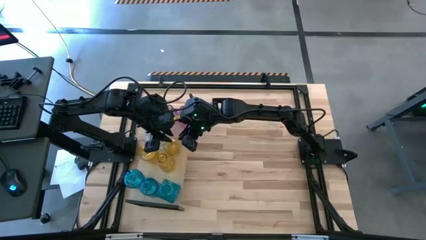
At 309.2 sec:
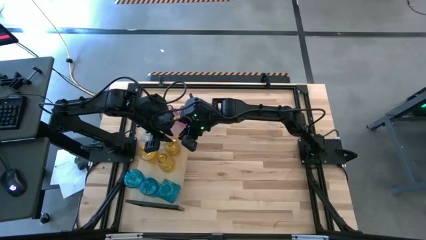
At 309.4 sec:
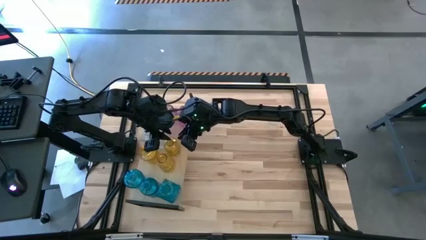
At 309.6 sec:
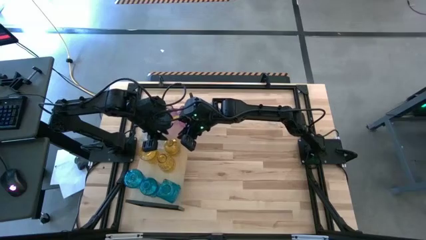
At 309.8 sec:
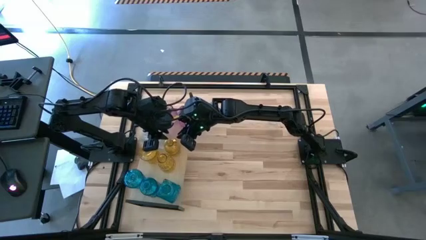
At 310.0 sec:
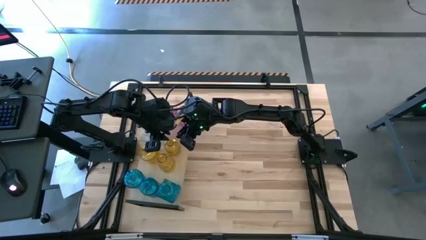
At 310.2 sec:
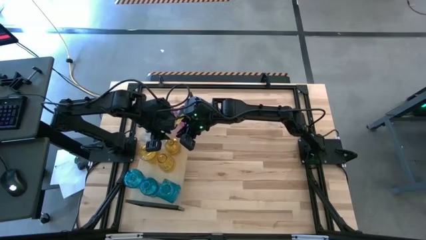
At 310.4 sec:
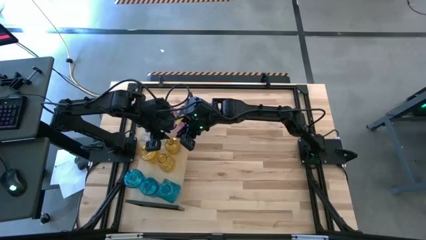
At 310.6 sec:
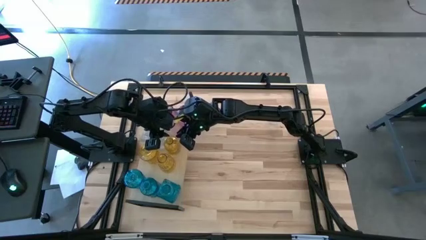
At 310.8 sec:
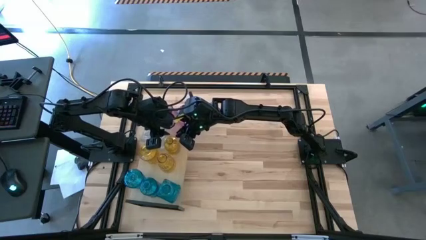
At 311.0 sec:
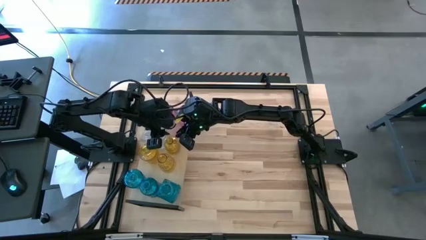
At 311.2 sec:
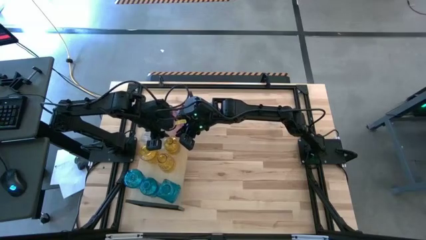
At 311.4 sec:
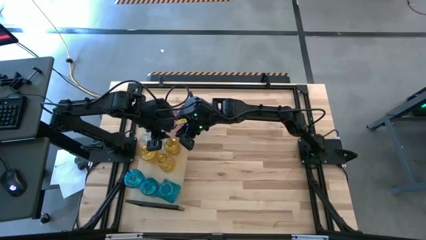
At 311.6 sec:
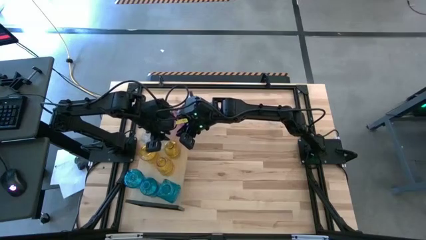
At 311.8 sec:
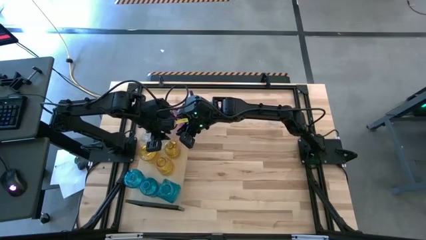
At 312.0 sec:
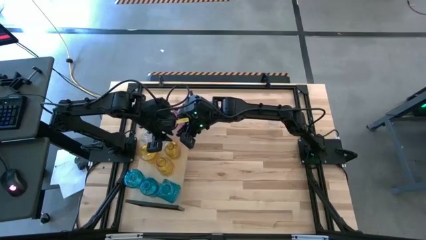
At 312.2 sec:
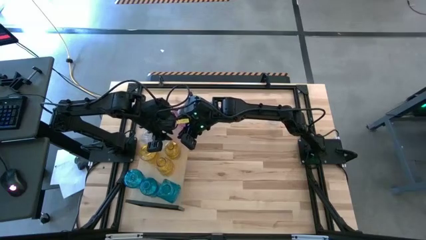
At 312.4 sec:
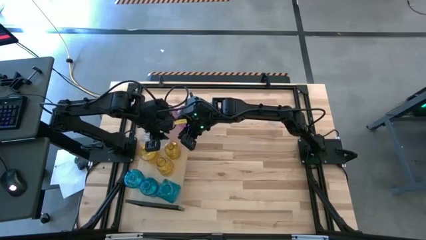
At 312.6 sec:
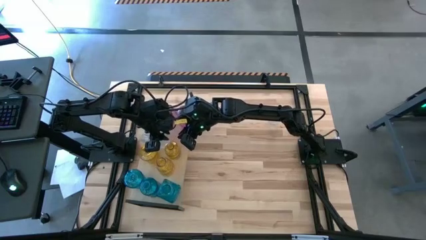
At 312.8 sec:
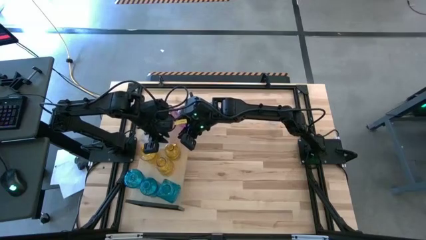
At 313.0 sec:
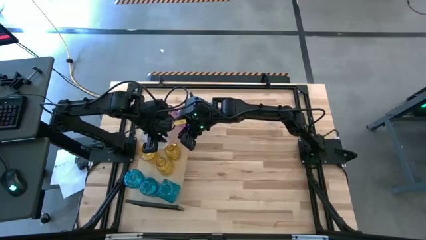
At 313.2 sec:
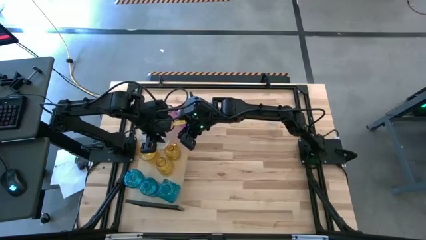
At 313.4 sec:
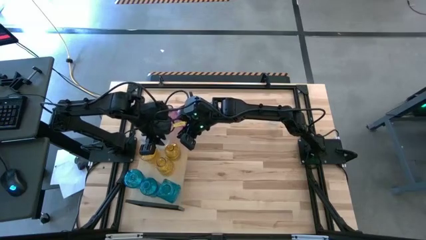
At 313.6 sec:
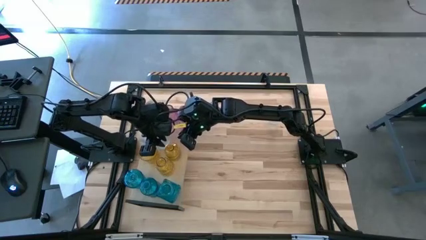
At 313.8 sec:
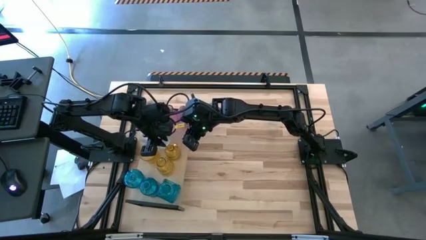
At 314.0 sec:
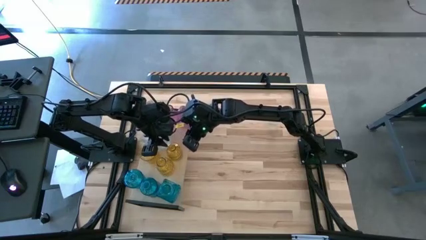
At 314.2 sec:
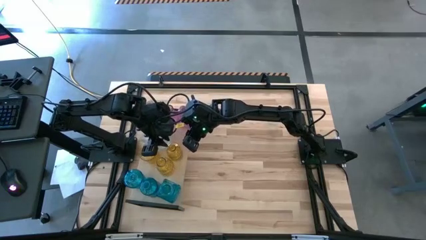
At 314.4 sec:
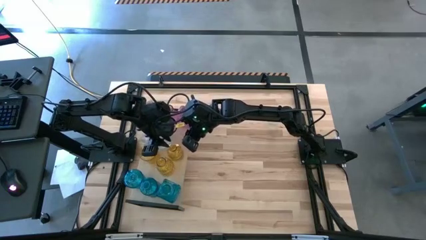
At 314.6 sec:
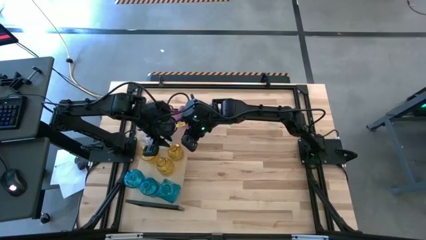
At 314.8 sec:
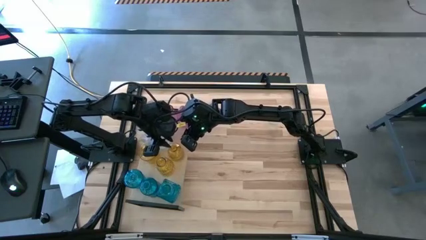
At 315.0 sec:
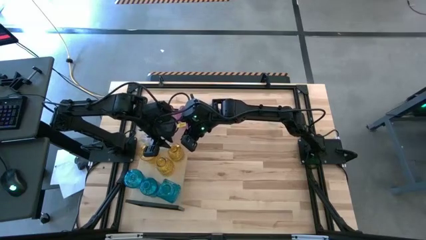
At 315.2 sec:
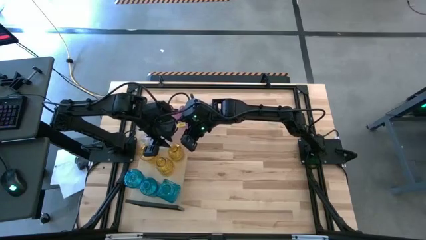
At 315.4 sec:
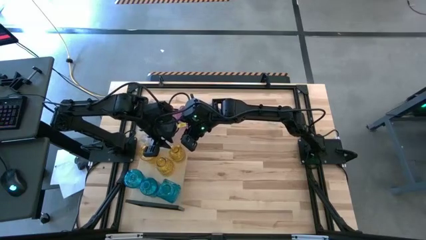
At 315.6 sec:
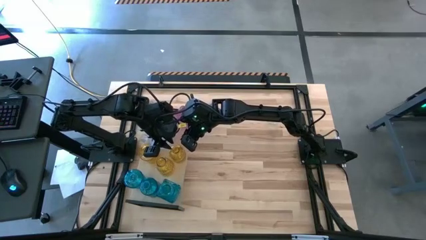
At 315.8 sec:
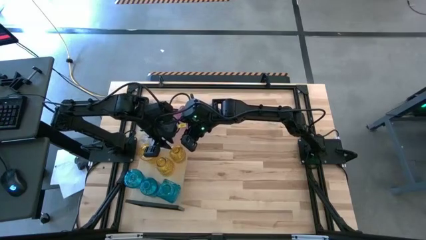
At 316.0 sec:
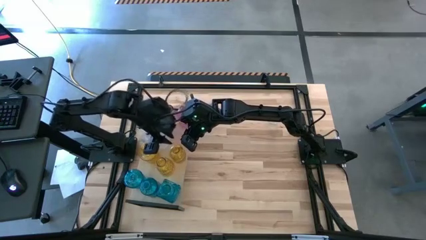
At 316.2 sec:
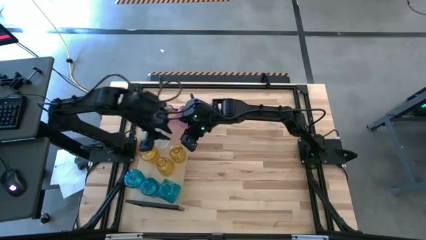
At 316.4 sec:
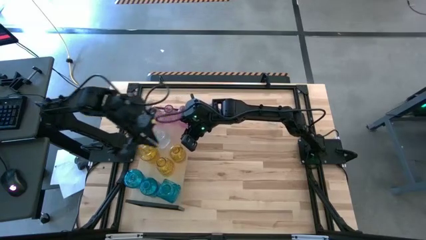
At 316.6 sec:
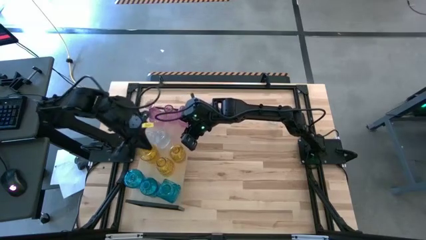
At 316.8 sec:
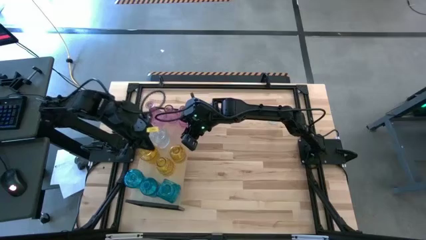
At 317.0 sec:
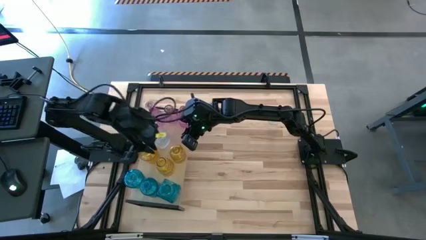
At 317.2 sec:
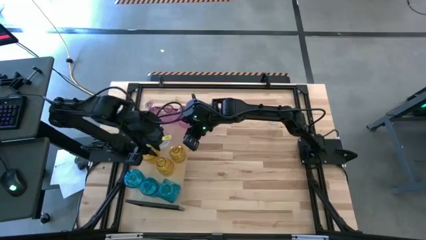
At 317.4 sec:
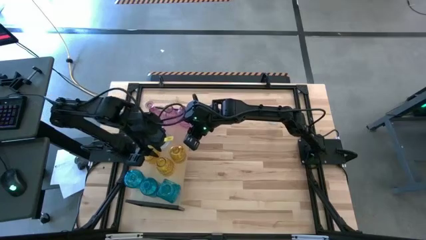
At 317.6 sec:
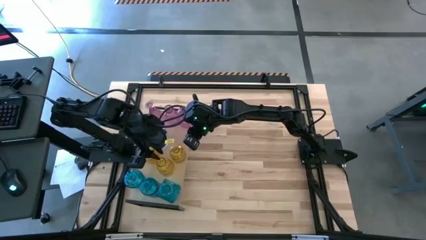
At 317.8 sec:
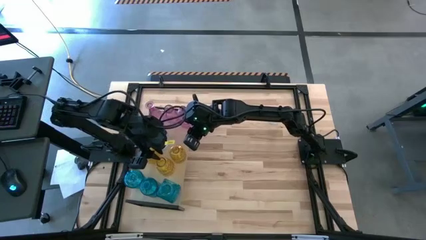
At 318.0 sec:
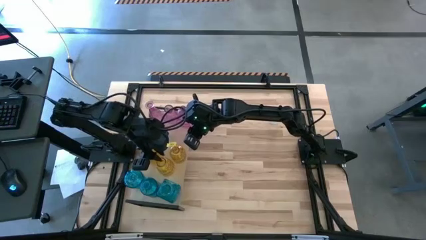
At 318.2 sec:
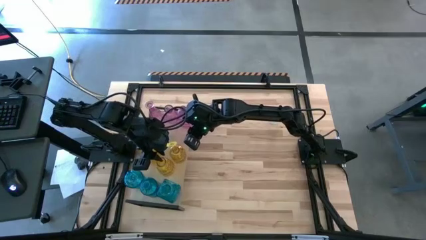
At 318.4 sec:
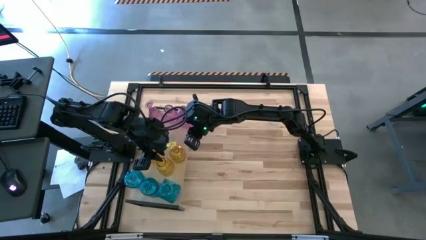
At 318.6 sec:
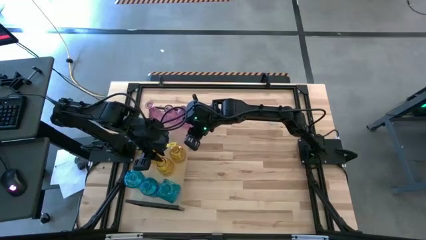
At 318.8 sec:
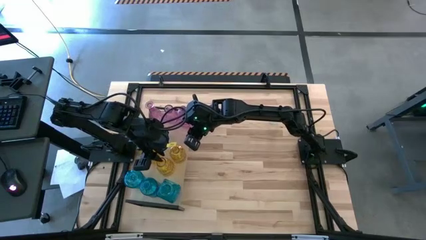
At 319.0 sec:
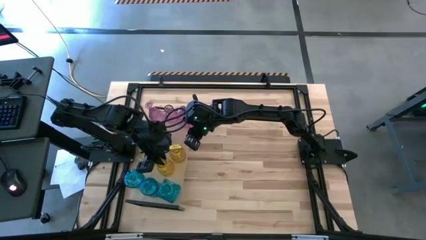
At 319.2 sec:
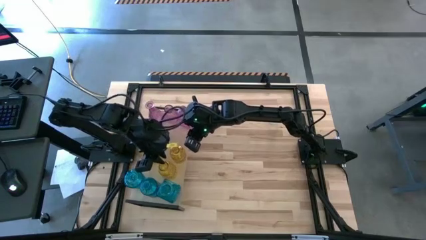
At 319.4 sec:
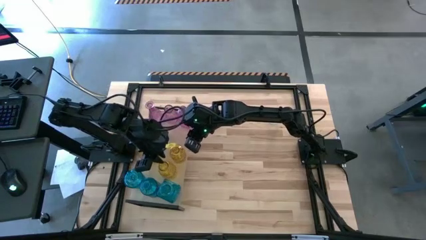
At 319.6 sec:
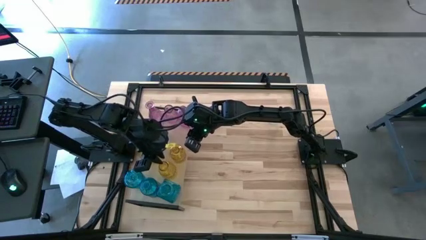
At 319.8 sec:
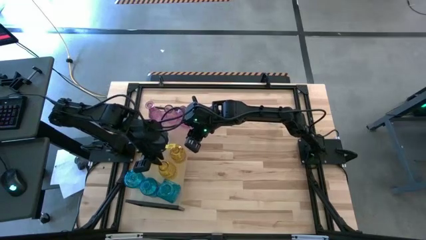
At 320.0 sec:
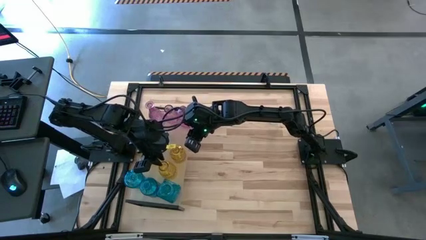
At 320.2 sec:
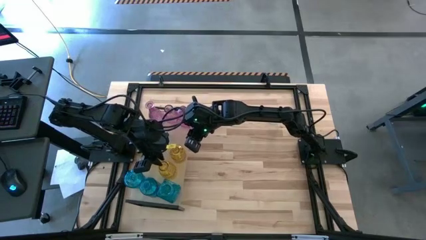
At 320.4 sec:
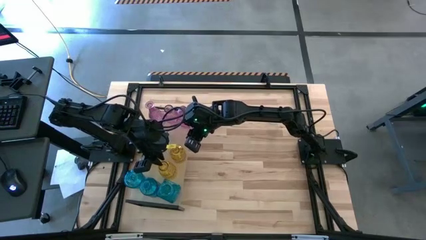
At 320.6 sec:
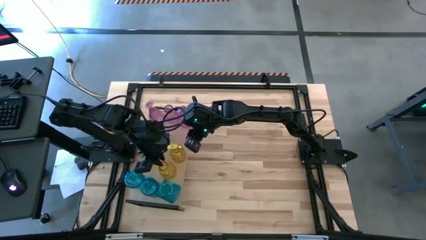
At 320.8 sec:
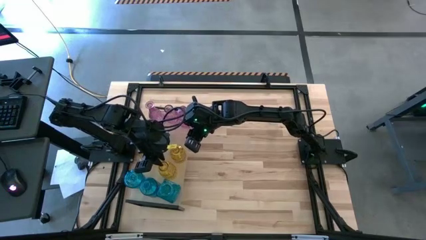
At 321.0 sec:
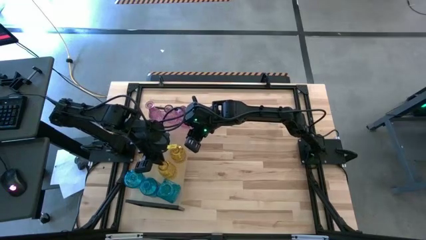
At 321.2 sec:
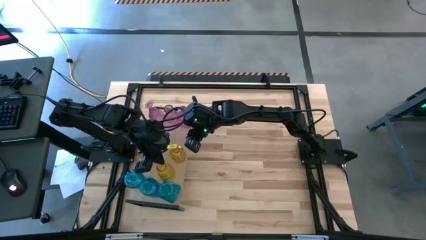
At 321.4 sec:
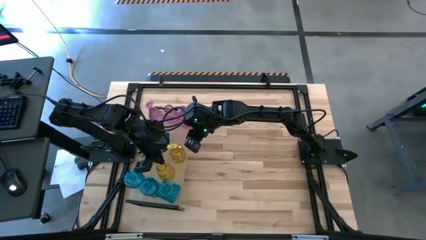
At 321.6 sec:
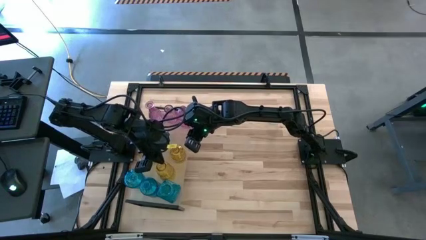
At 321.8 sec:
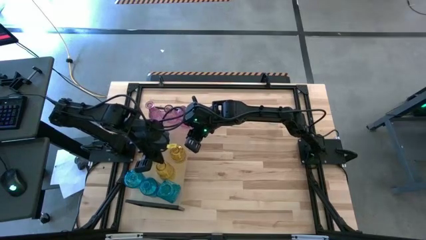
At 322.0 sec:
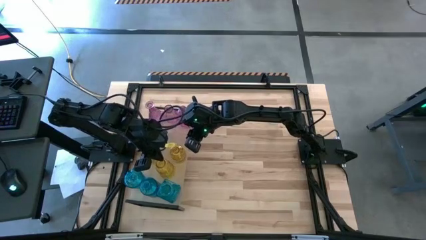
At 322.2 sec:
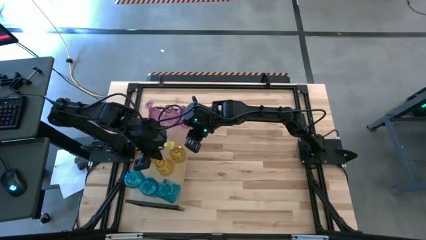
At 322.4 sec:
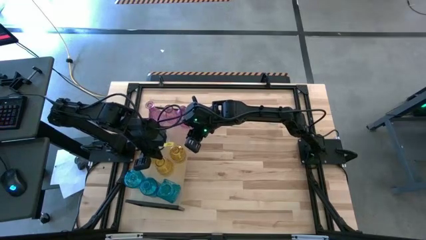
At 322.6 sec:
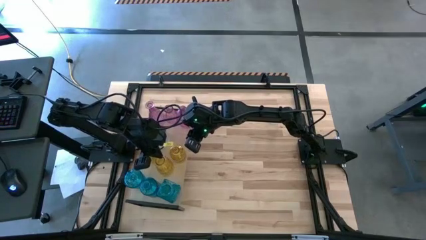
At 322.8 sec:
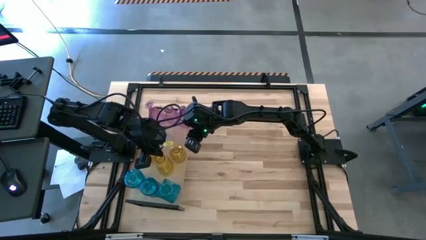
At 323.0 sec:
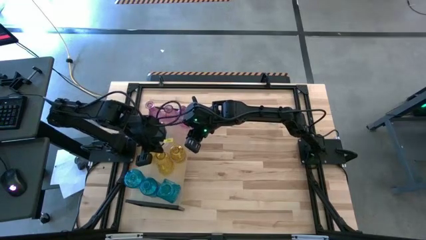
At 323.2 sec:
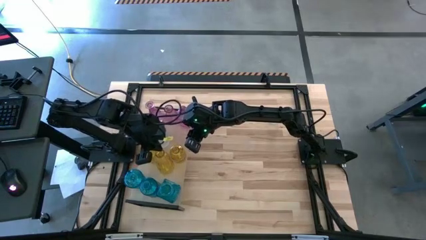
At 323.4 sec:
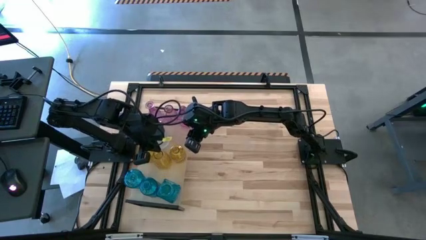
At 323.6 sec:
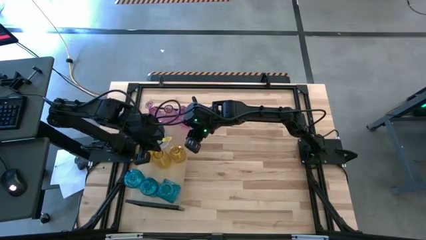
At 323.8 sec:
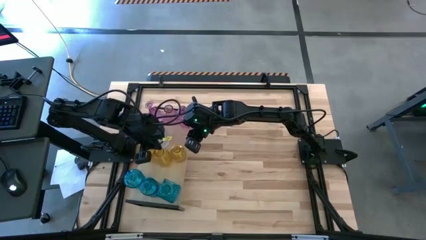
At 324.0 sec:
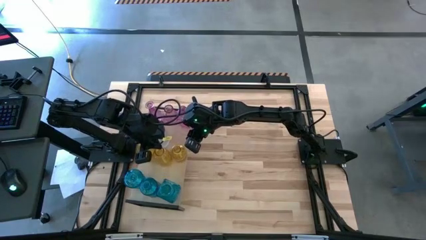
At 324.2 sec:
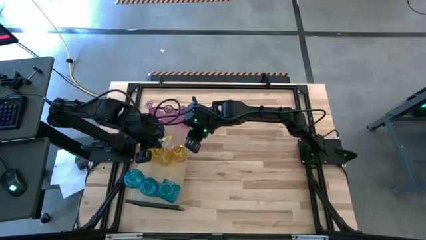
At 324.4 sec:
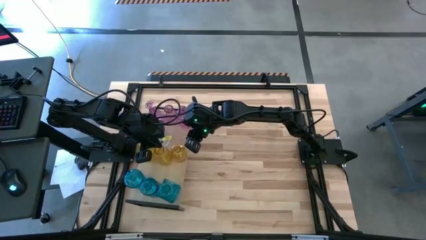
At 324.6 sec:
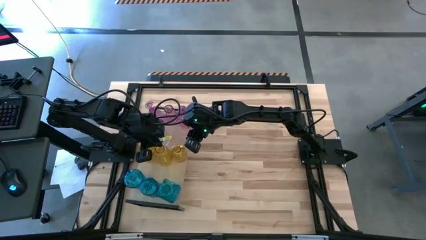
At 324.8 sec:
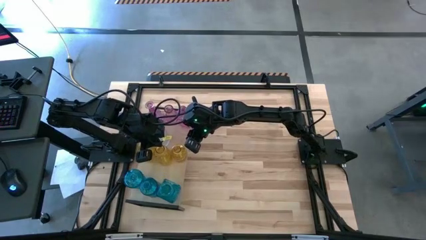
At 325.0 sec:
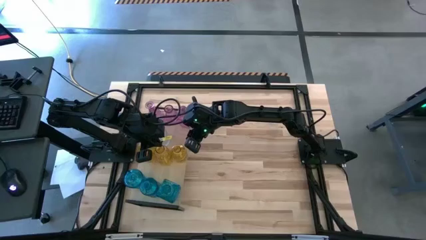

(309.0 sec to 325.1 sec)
Task: sort vases onto shelf
Put the yellow flower vase on the shelf
